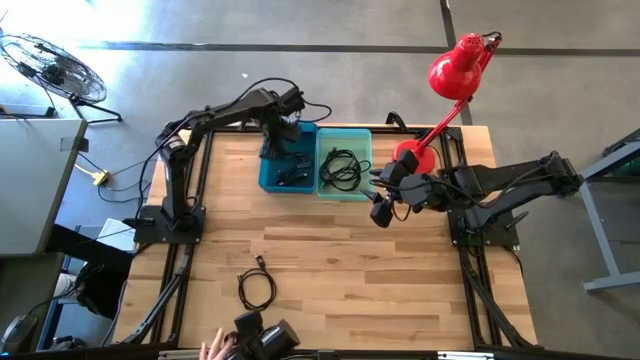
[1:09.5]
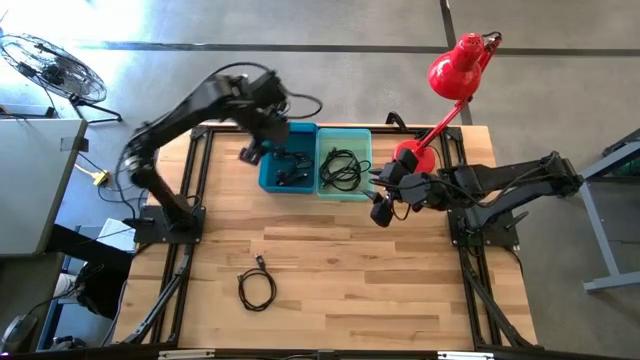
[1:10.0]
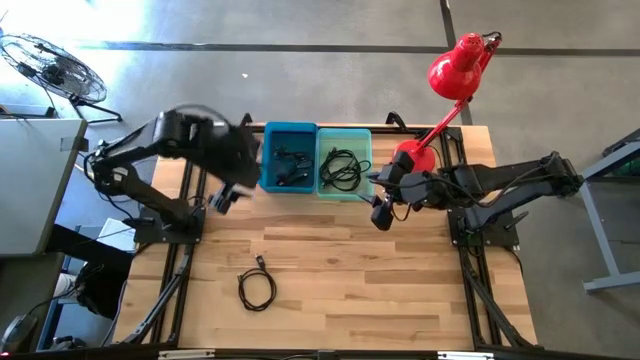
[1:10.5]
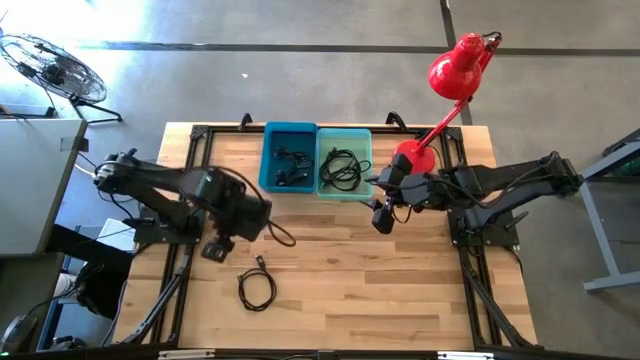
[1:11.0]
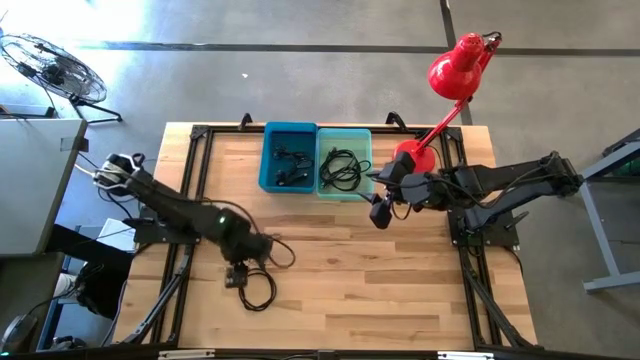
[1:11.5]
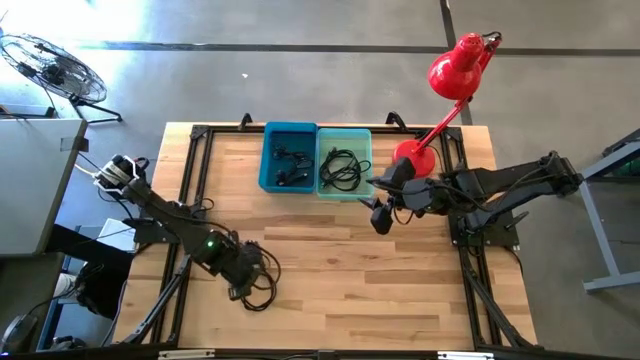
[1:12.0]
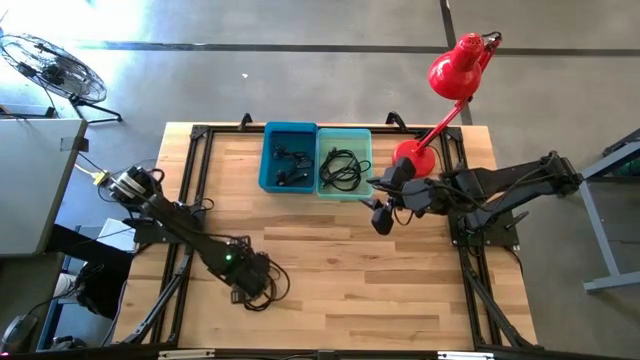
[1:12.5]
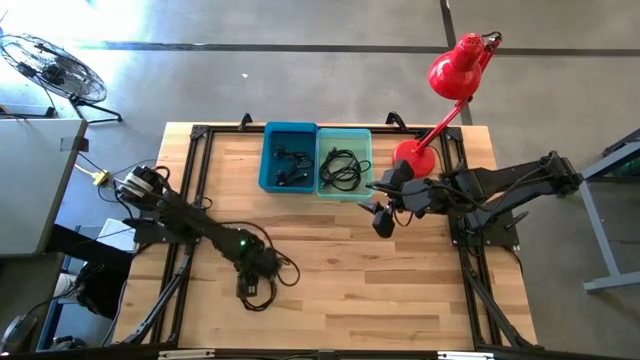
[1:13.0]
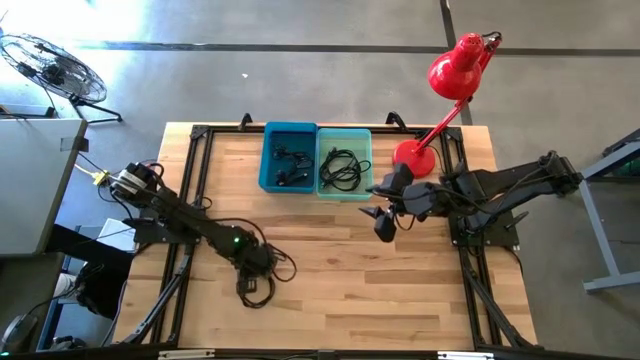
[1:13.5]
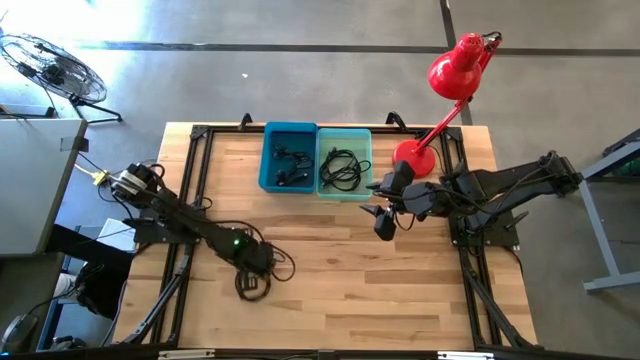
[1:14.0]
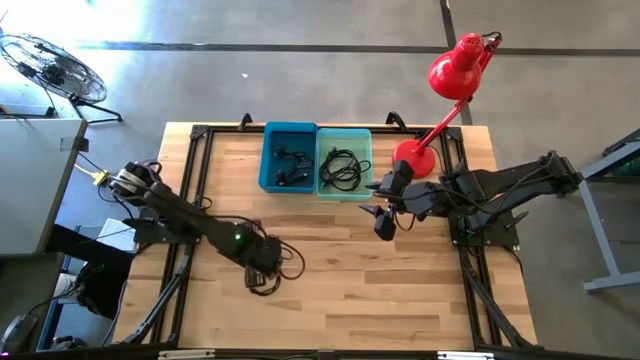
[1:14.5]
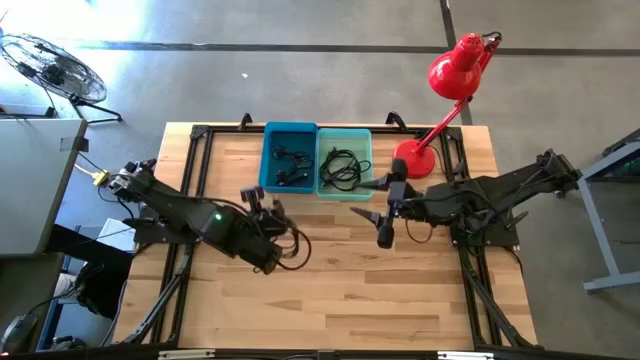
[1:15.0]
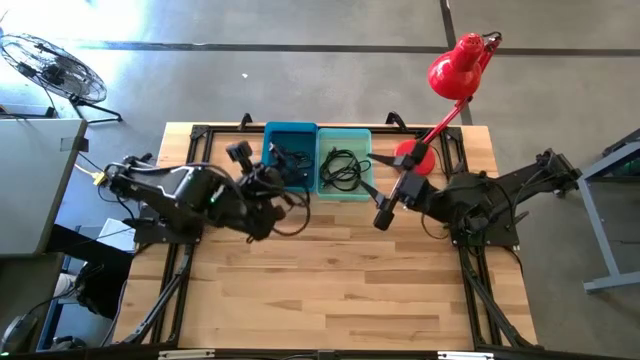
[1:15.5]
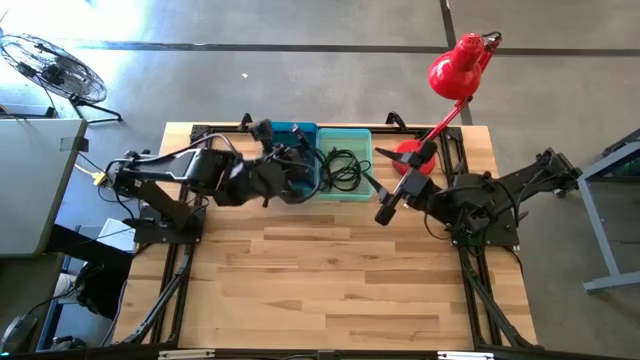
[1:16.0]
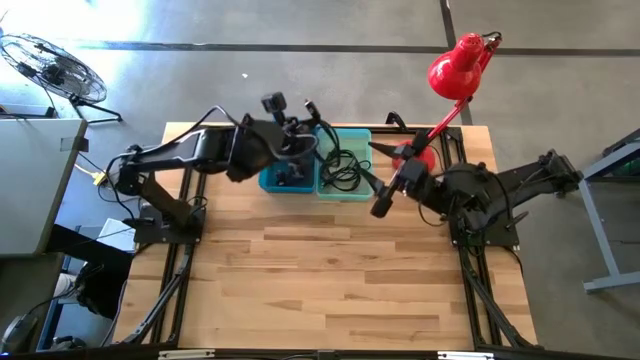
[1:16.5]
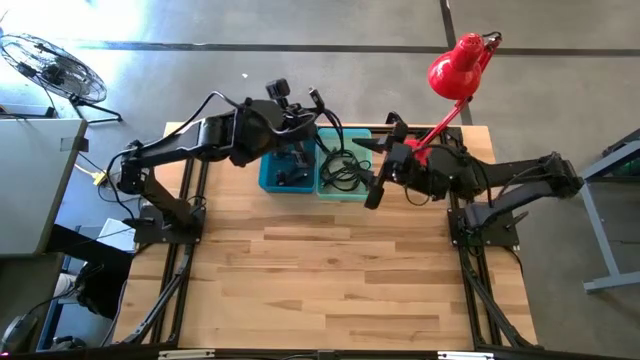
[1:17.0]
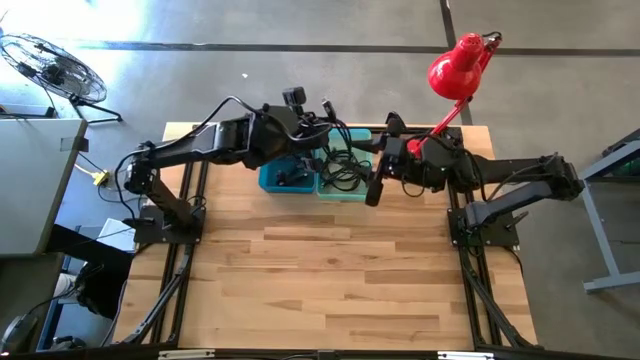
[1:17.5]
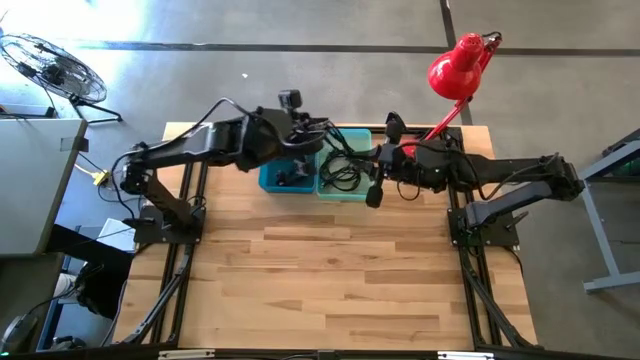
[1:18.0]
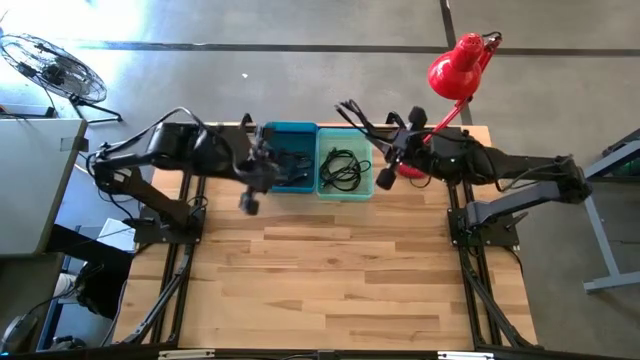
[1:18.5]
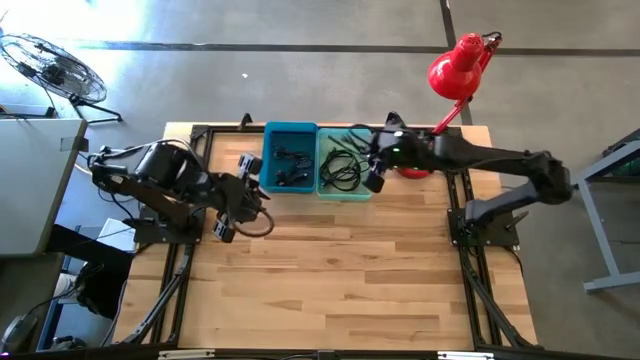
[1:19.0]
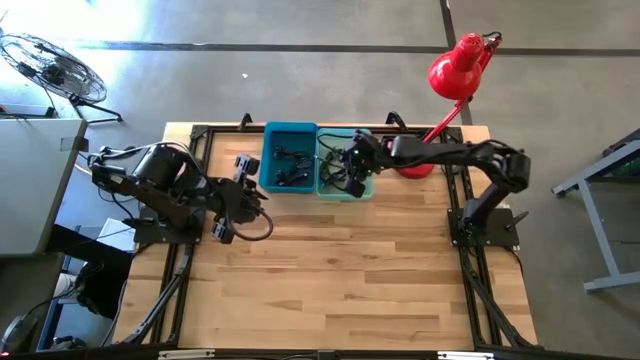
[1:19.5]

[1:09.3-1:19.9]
Task: Pick & Place USB Port
Put the black USB cable into the green bin

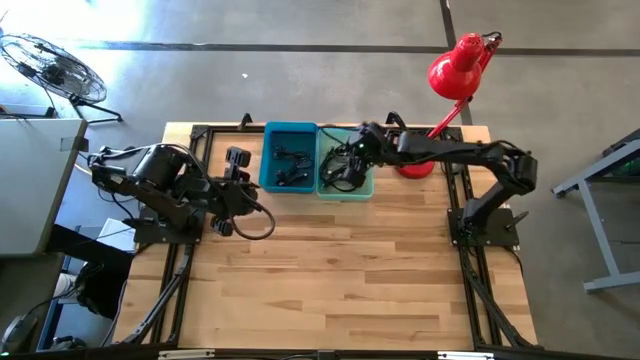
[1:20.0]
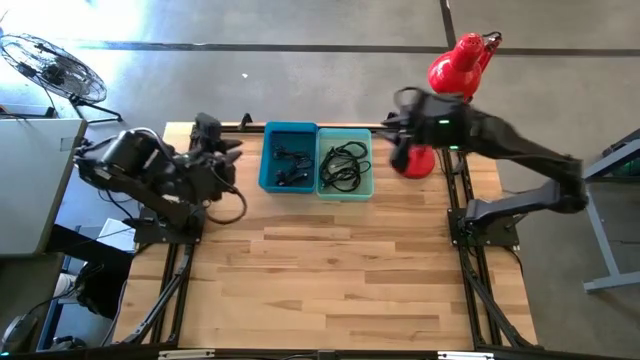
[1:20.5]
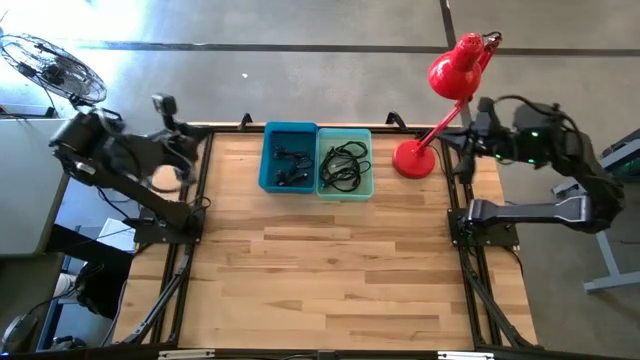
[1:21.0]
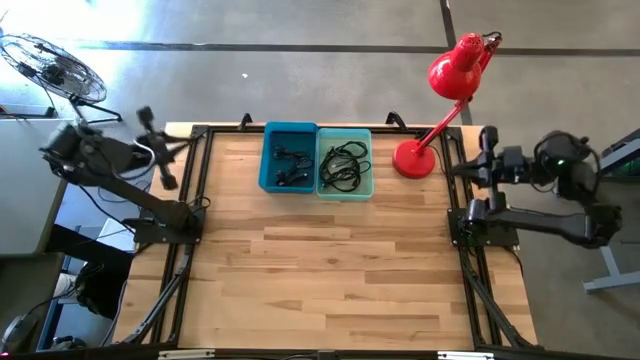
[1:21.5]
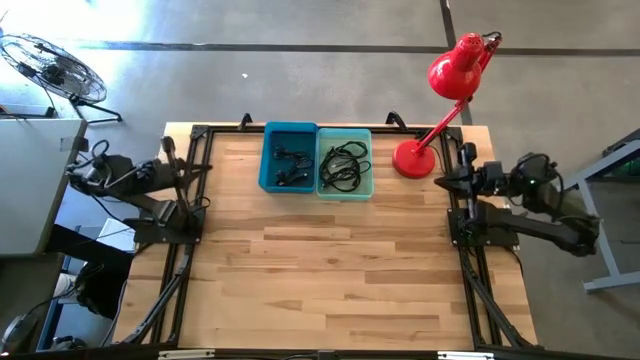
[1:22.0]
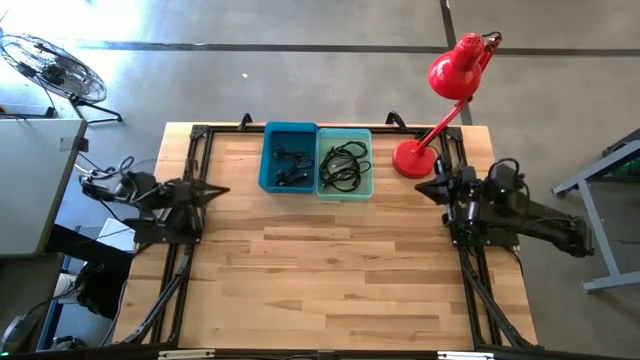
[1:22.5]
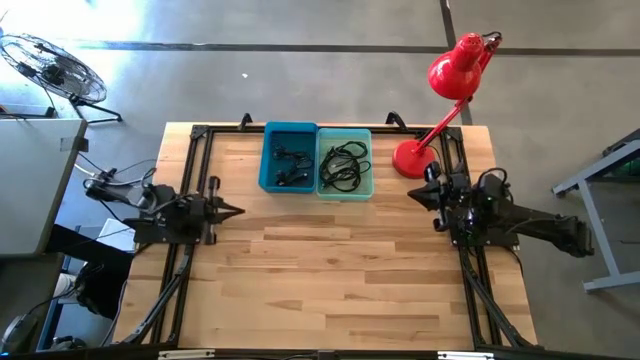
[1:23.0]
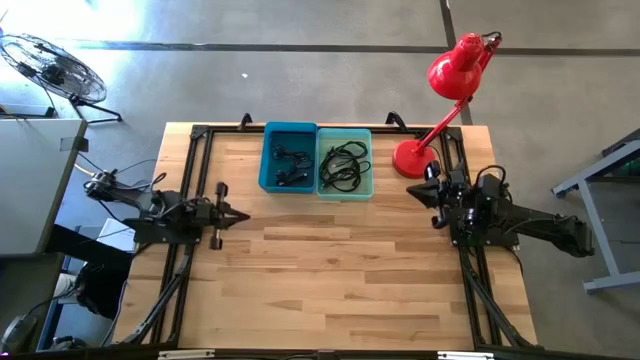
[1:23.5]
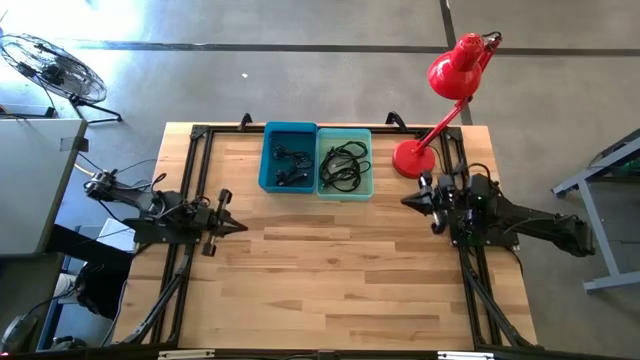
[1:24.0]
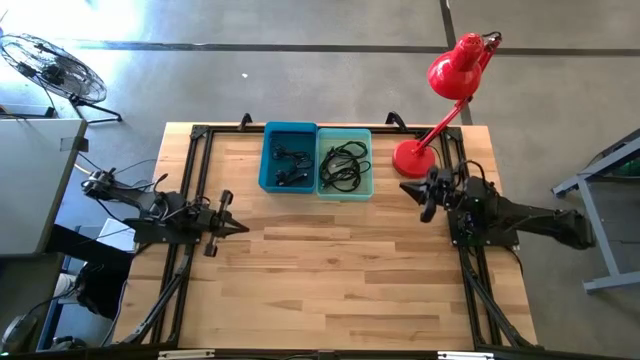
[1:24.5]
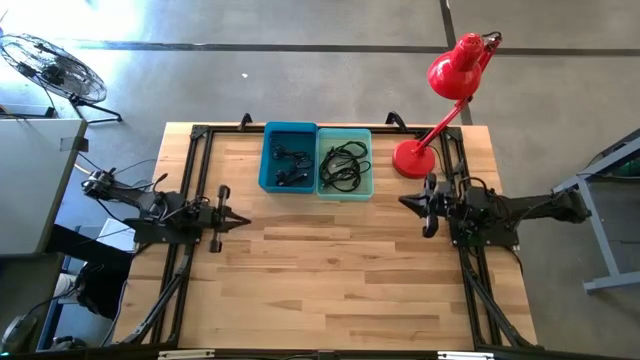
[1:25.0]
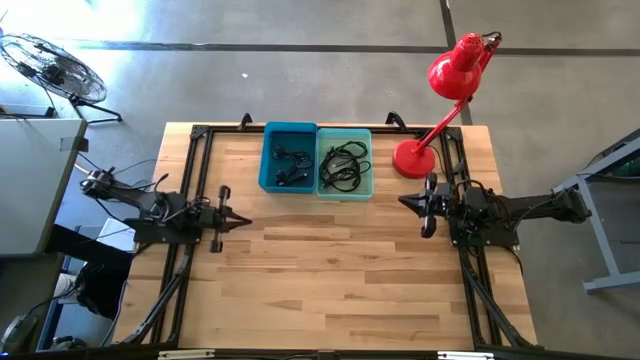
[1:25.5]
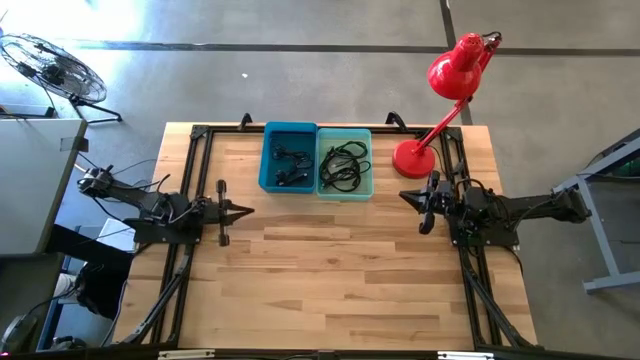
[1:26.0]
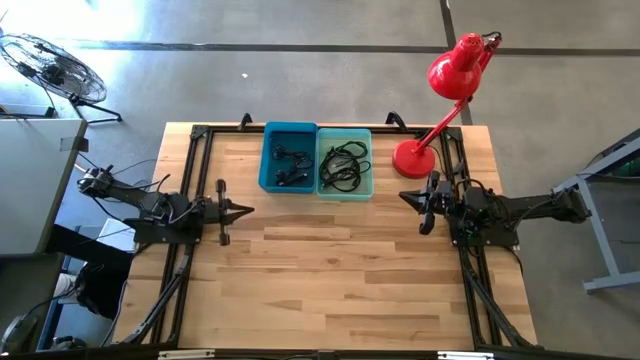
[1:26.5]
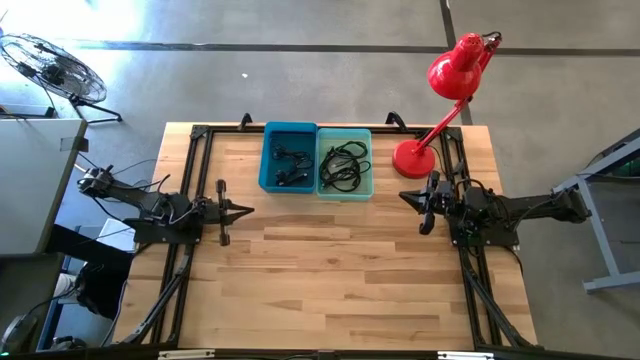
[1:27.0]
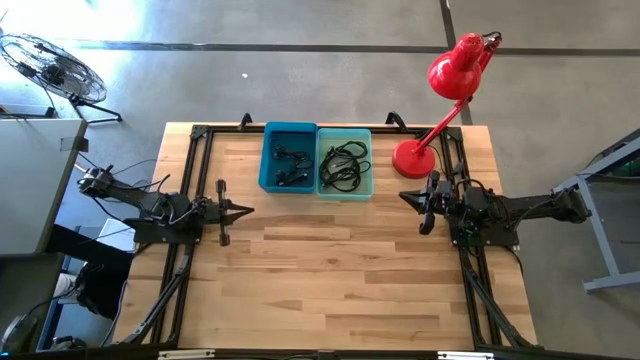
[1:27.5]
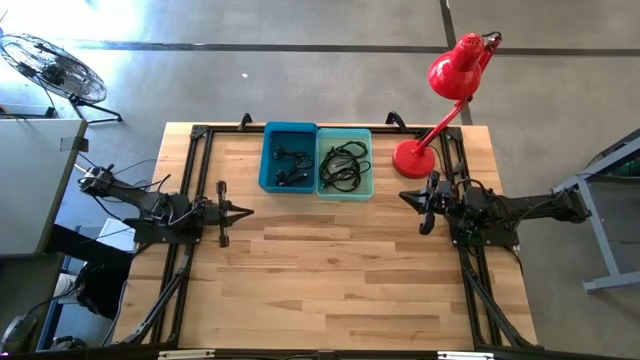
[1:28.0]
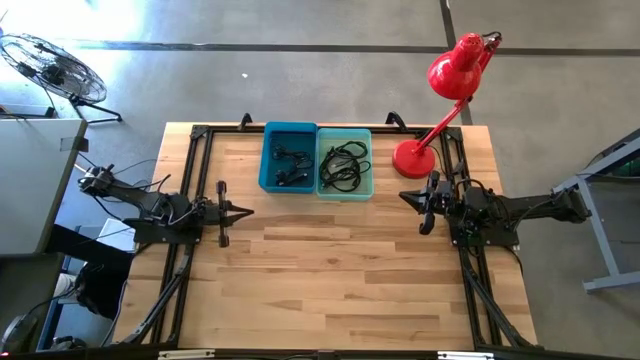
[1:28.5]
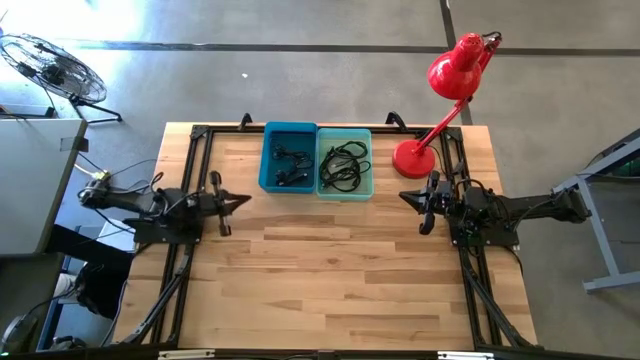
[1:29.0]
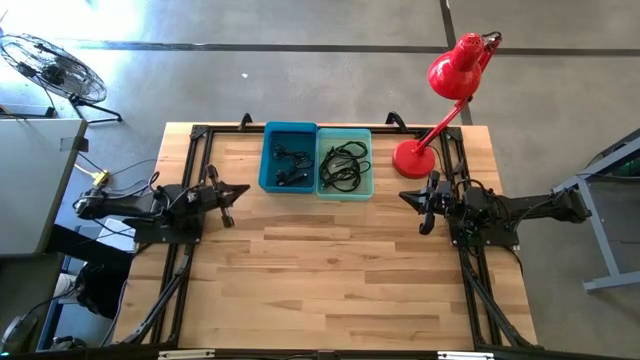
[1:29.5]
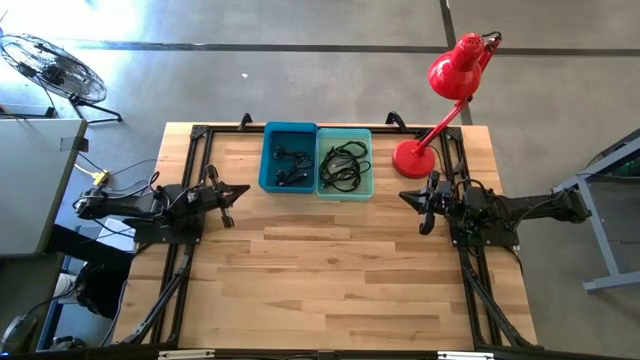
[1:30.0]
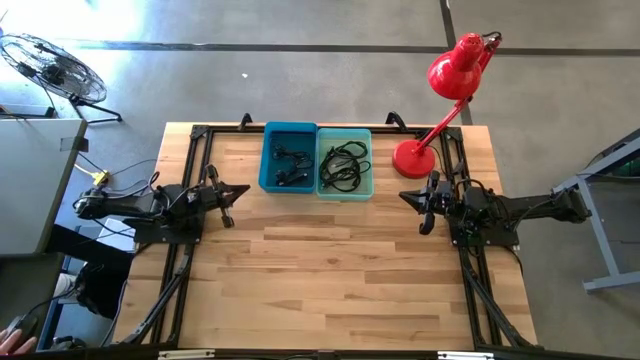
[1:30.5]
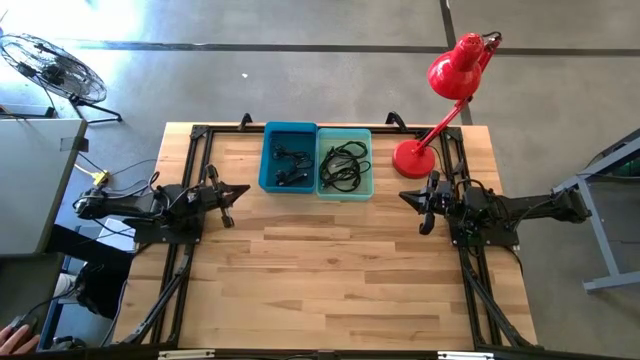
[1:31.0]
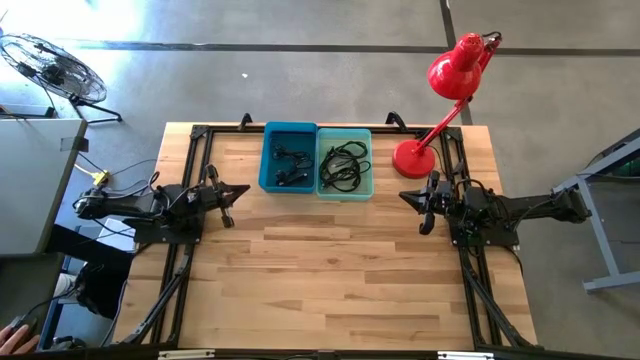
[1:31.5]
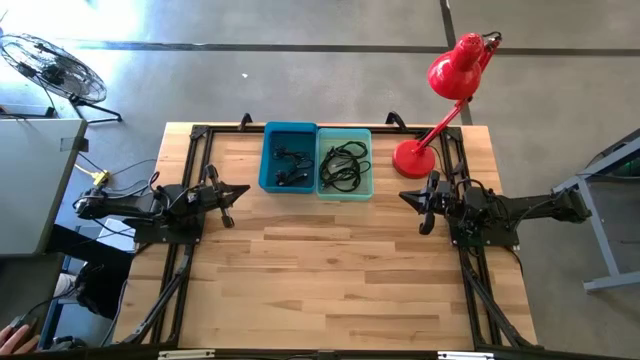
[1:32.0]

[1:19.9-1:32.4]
Return to Home Position
